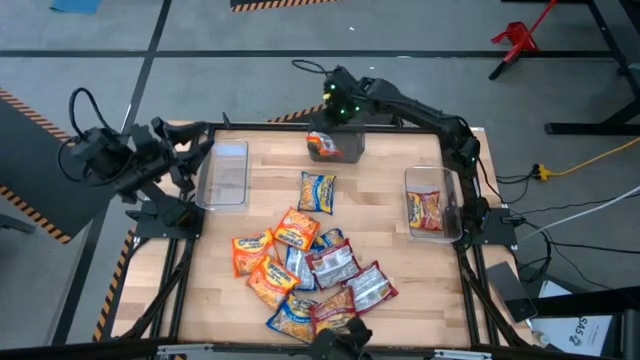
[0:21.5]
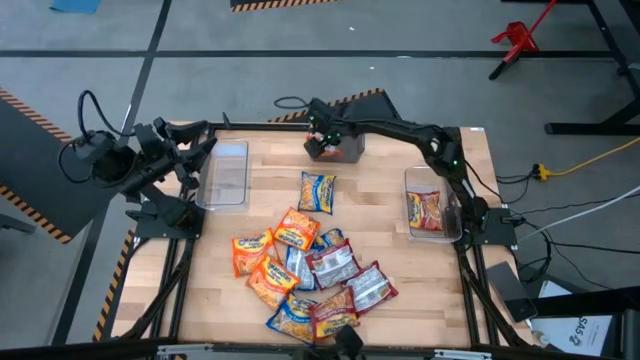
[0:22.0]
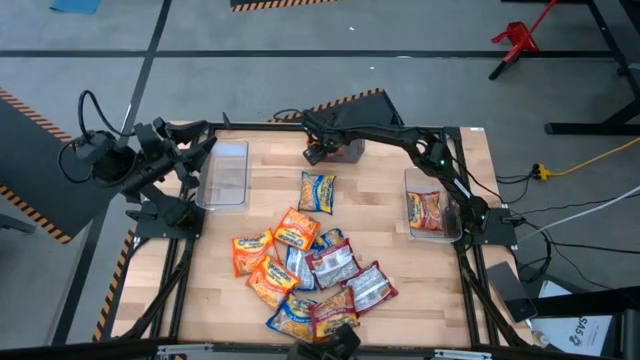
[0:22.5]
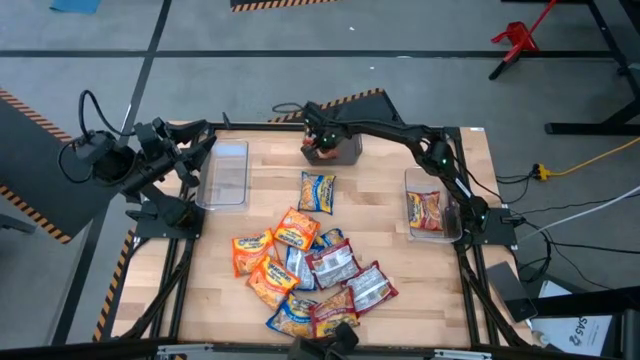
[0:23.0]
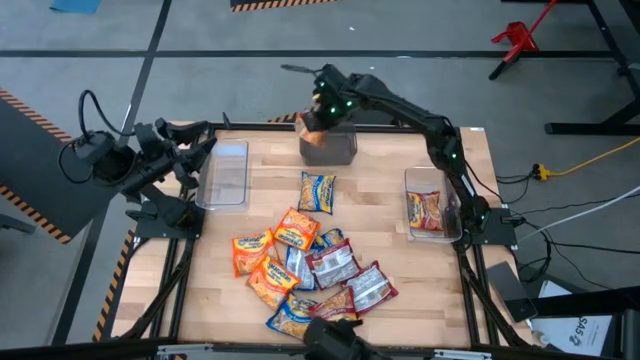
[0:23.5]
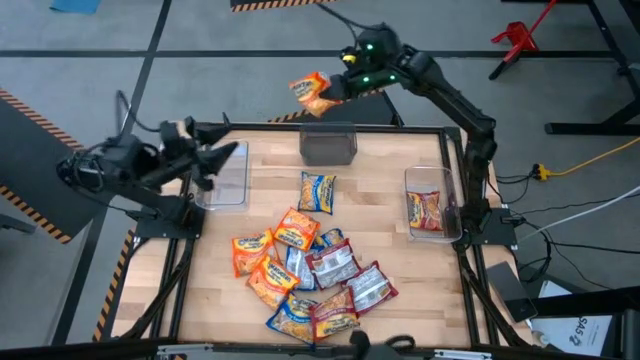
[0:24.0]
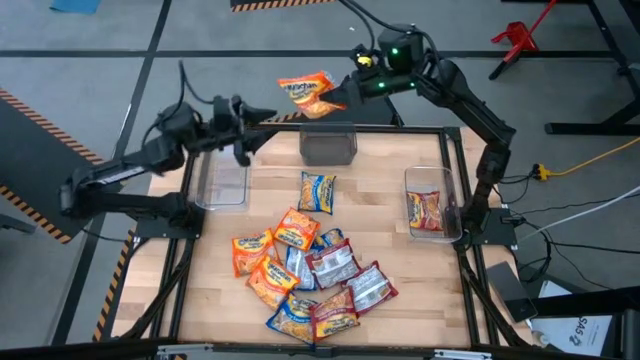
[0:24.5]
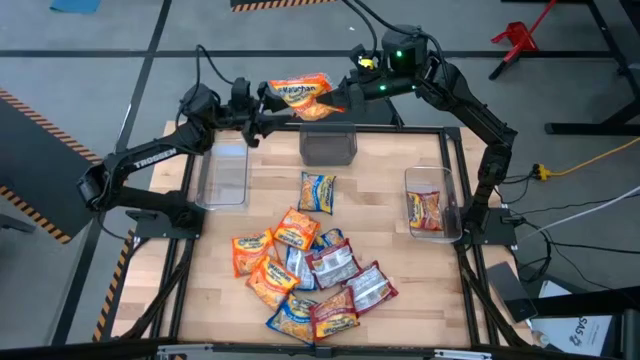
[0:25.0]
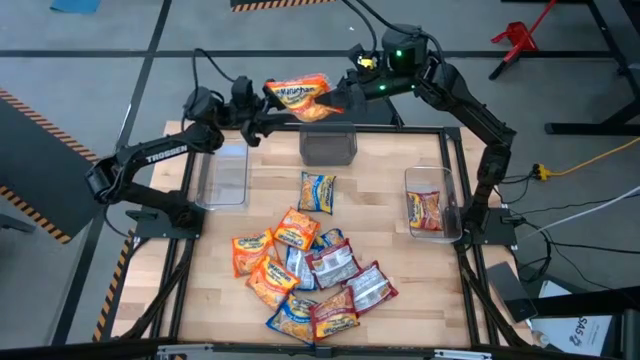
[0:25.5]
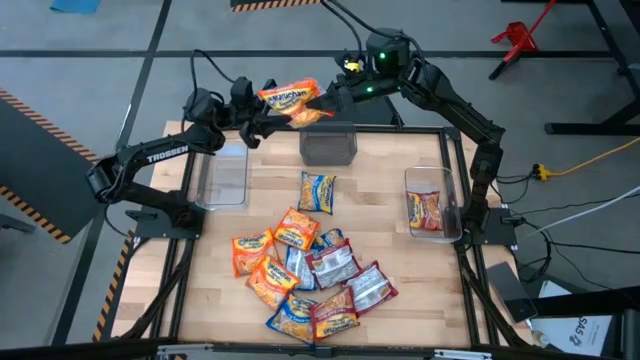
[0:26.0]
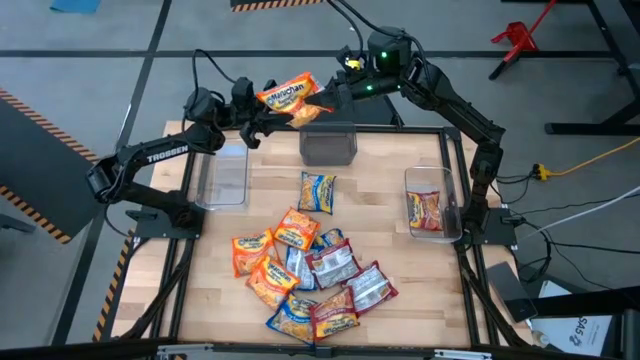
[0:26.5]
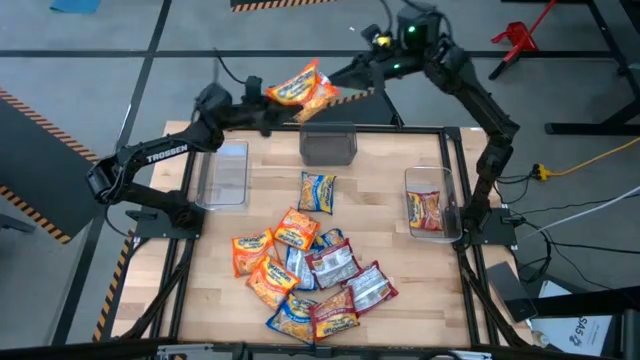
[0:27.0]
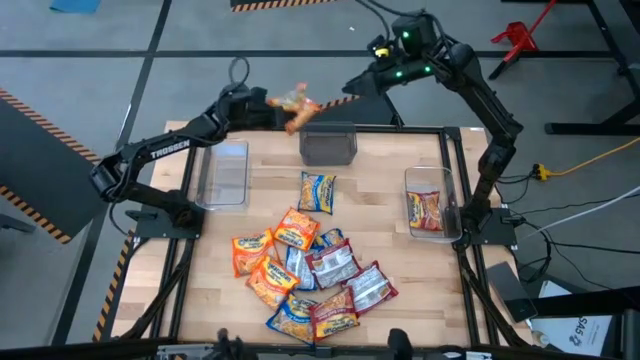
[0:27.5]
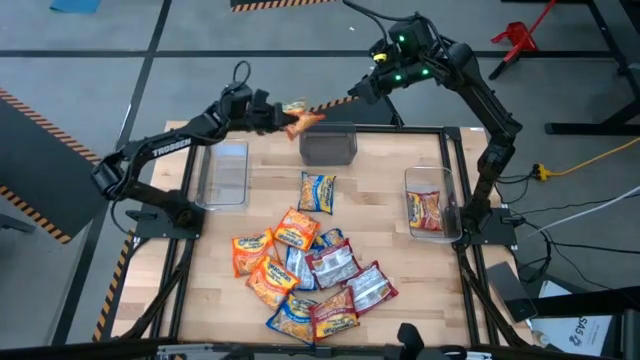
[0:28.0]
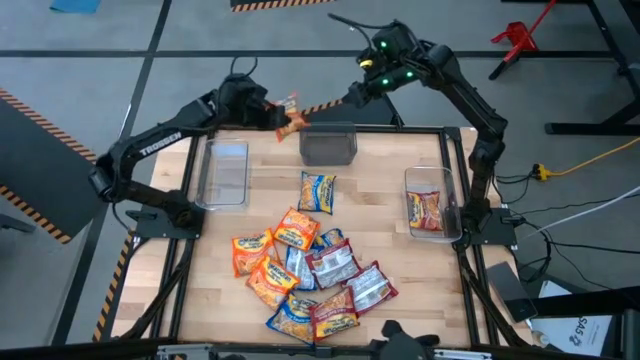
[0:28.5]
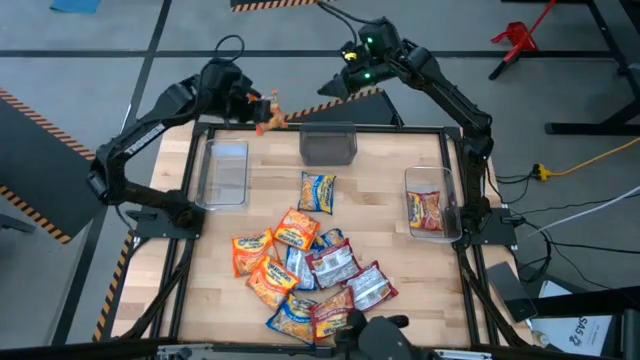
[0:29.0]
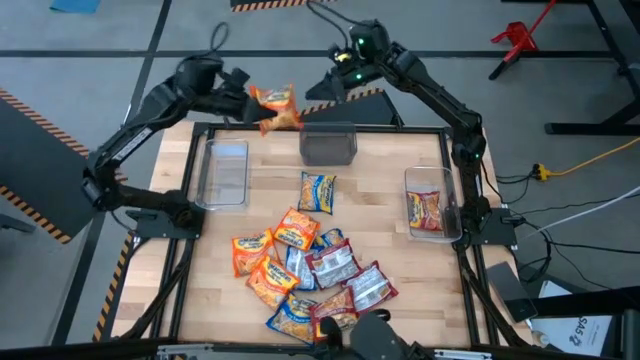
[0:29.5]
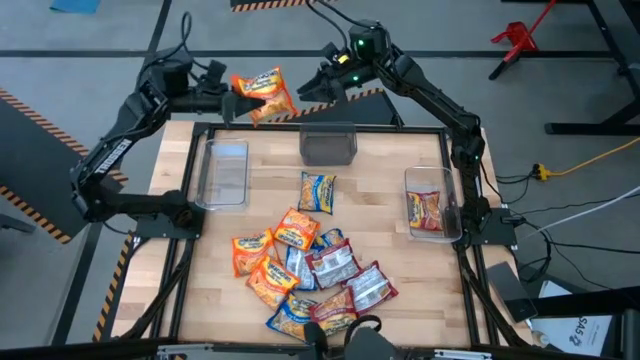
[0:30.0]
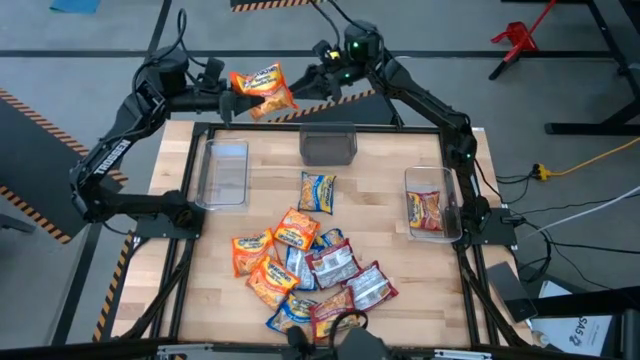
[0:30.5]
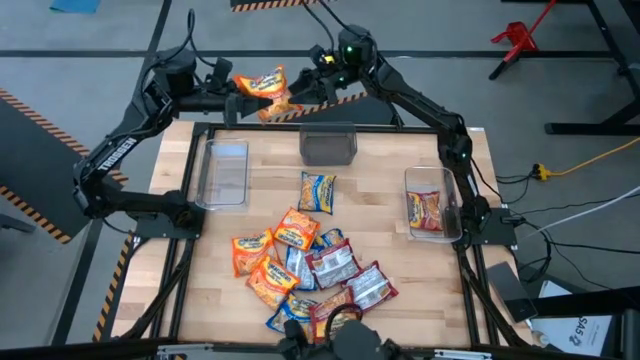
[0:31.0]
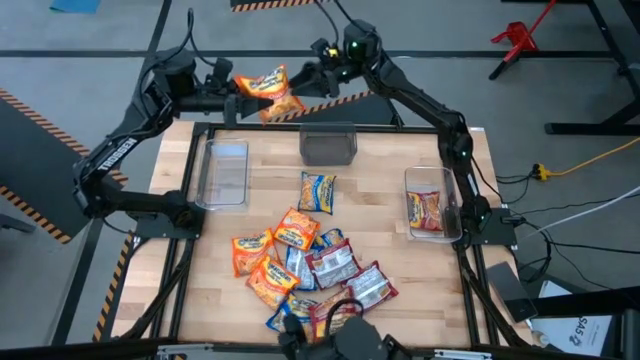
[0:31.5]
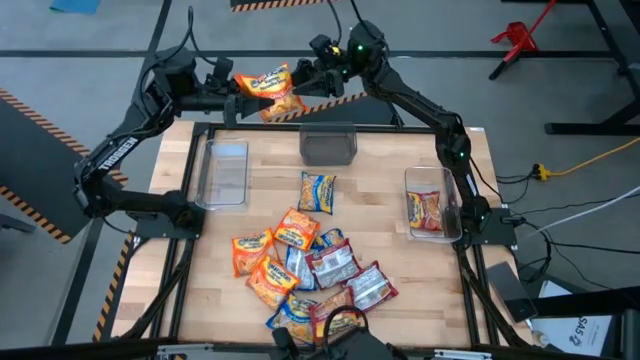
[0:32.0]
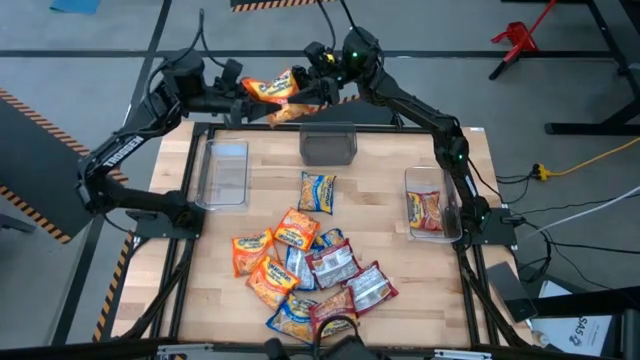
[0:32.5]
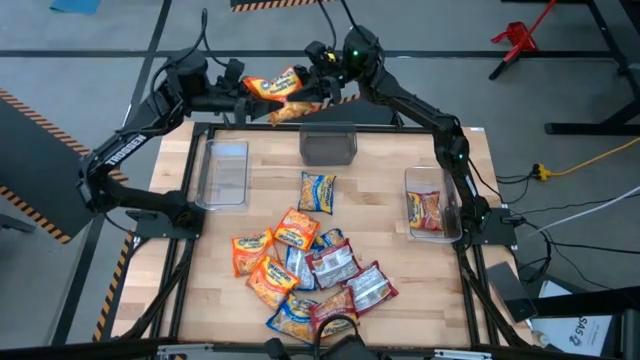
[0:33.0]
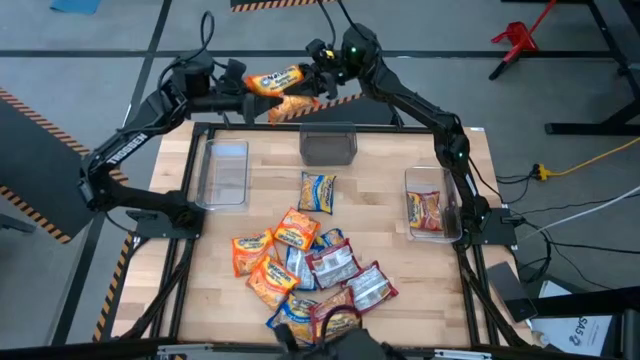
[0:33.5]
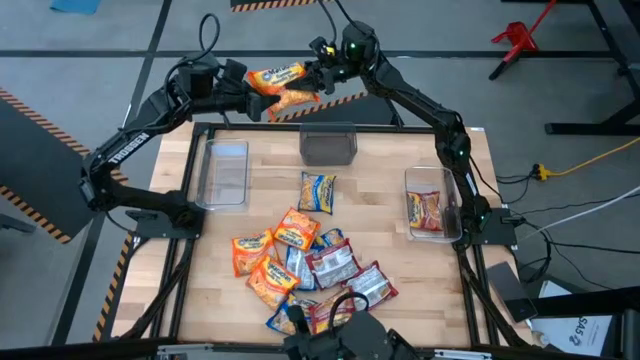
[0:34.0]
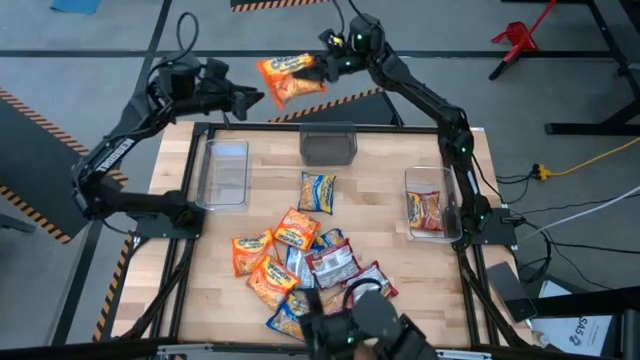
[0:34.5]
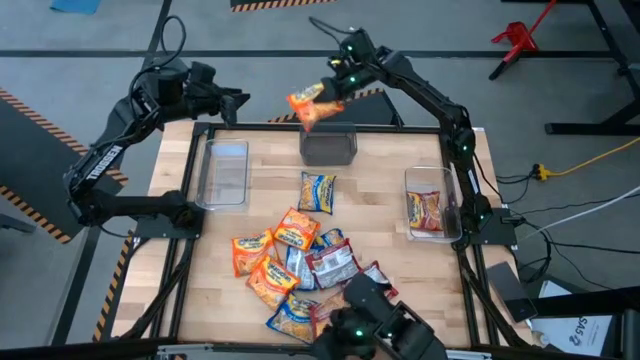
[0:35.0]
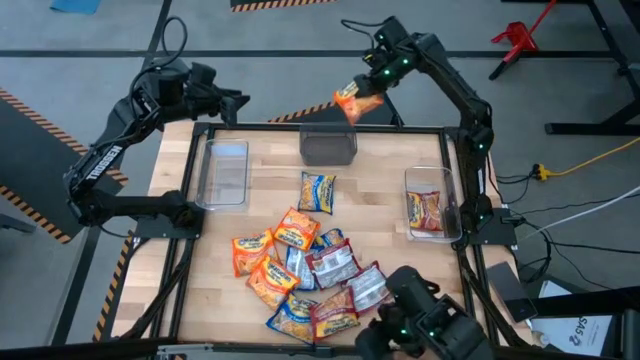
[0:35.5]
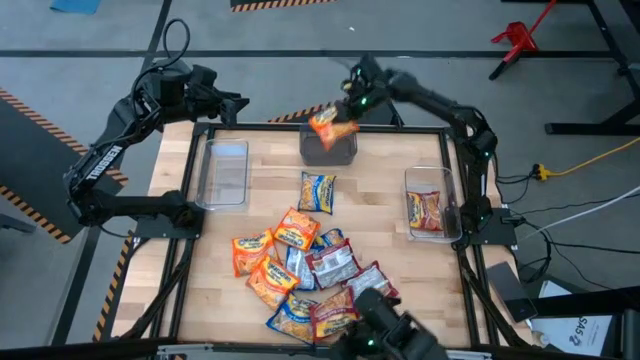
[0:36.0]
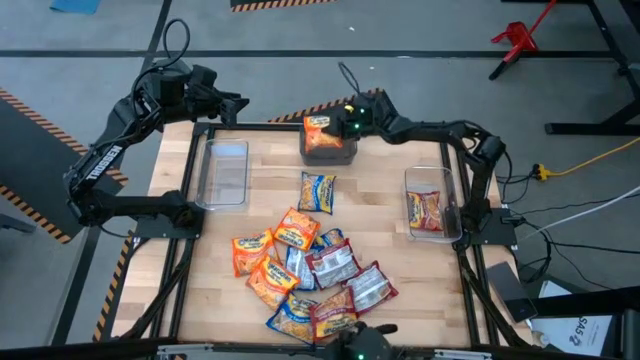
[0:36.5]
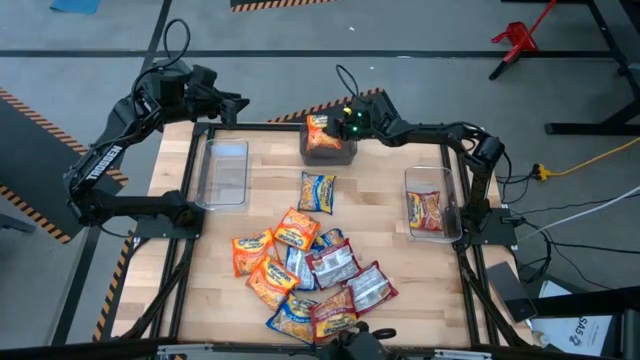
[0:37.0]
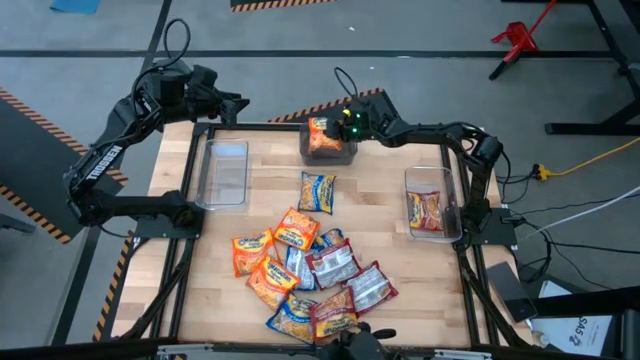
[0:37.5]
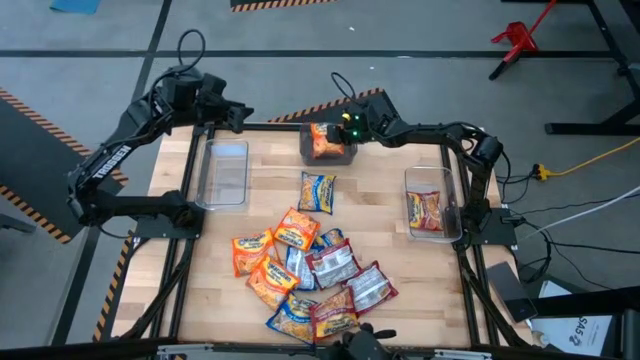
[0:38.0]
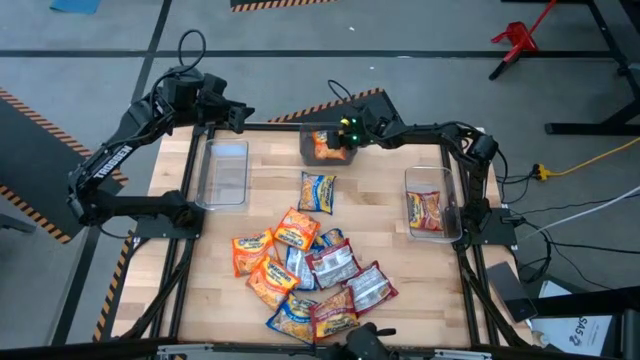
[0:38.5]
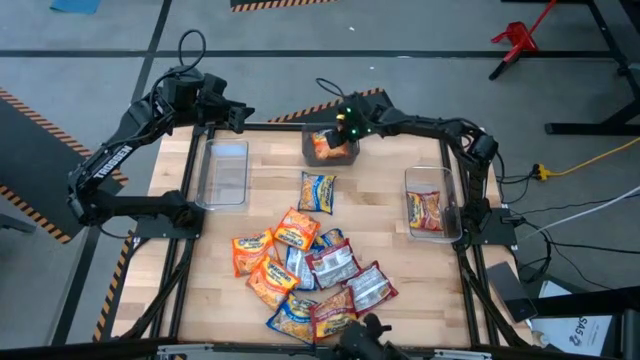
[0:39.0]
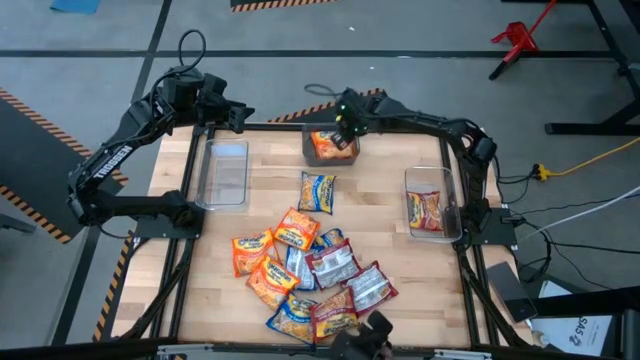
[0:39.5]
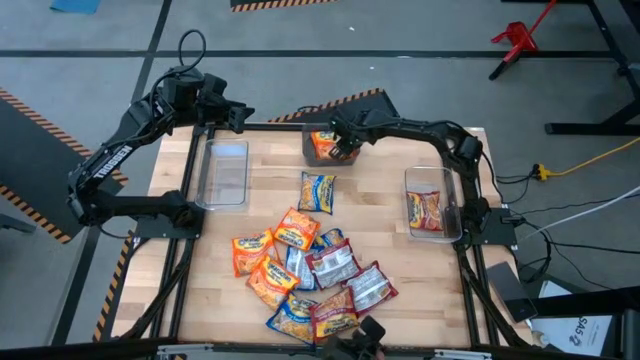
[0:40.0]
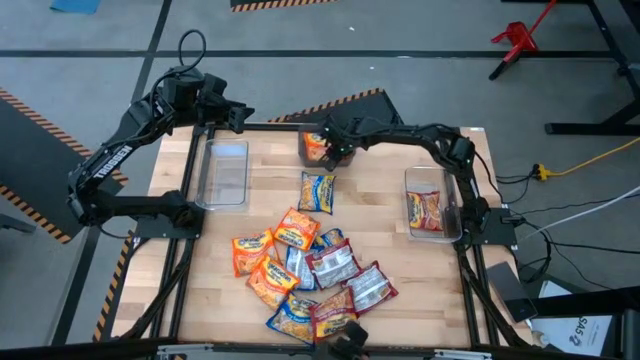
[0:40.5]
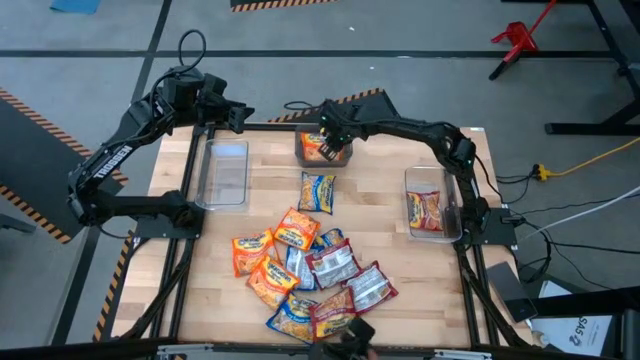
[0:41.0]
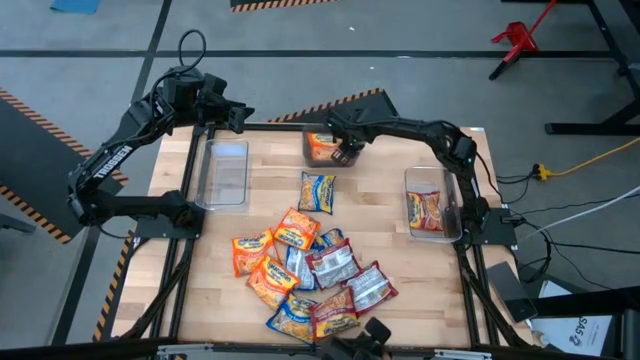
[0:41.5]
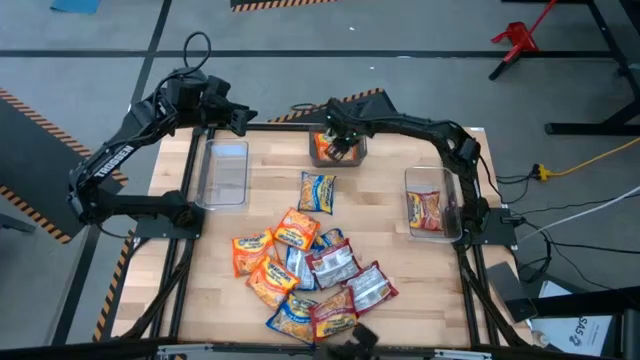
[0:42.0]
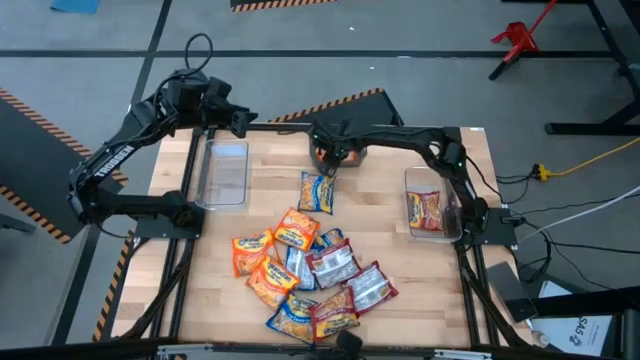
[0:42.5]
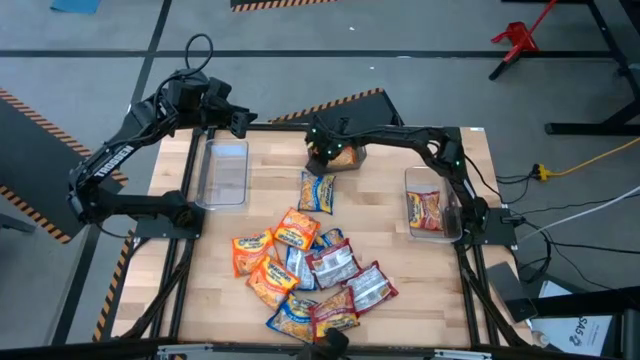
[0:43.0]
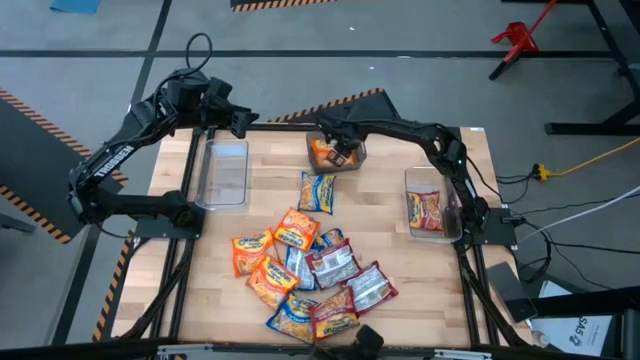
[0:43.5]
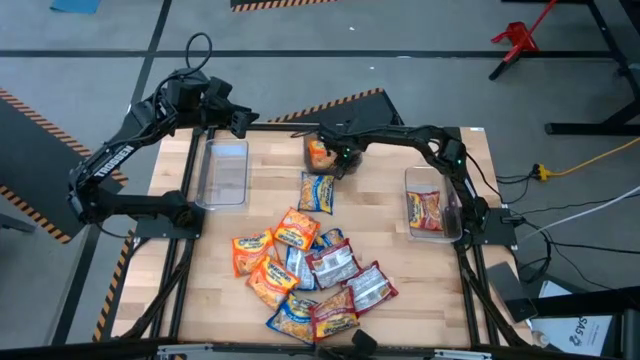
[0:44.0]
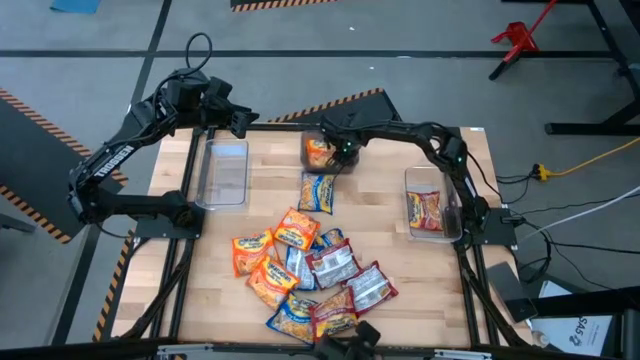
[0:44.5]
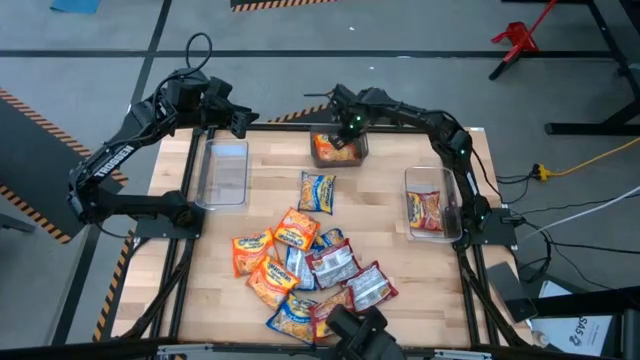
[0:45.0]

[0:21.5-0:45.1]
Task: Sort Maruchan noodles
Put the orange noodle pack into the black bin
